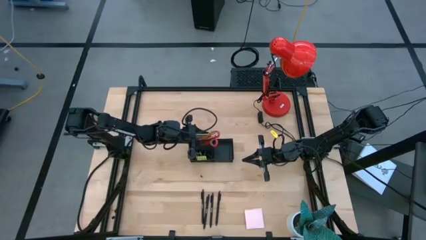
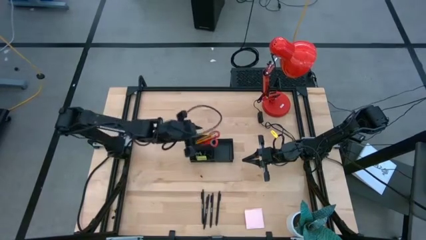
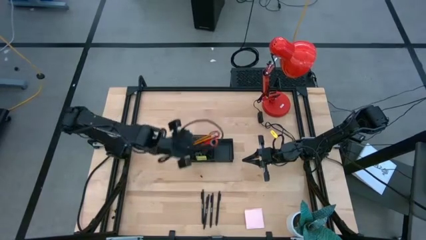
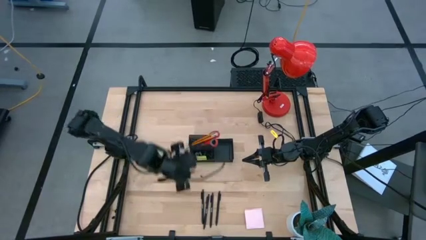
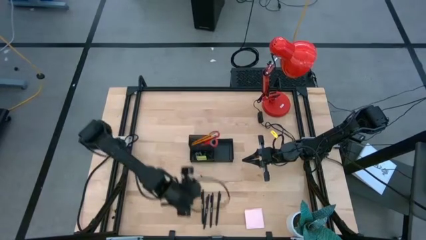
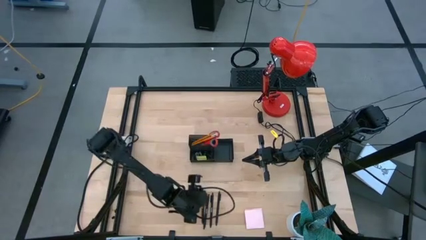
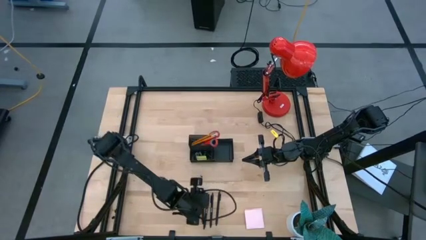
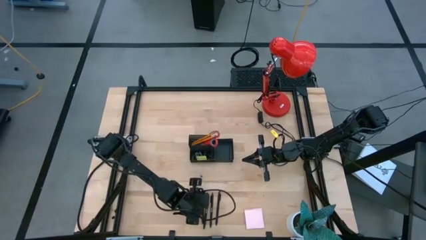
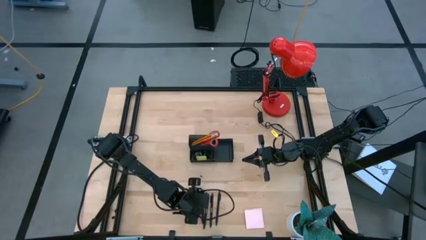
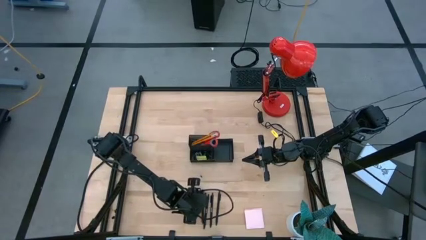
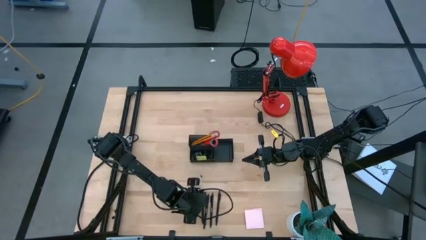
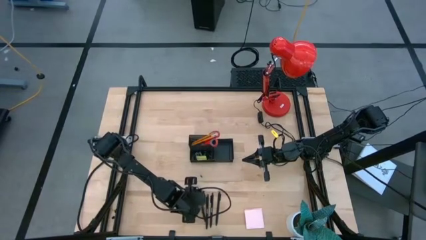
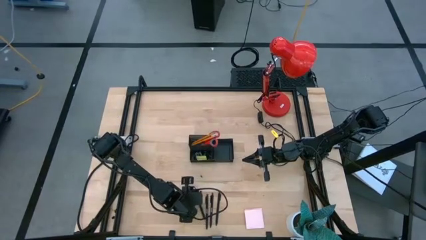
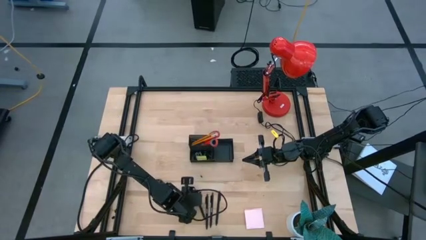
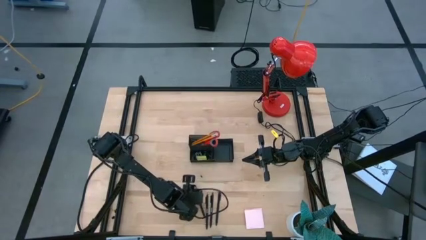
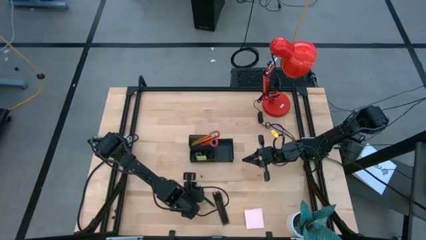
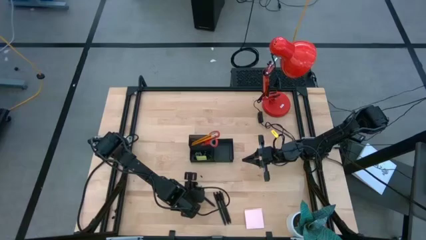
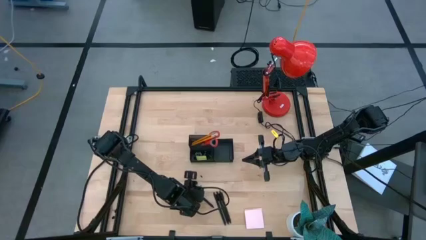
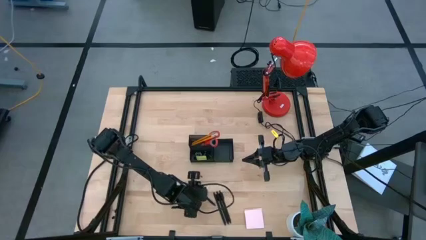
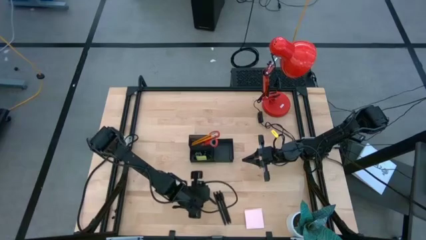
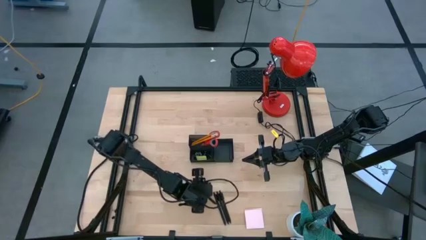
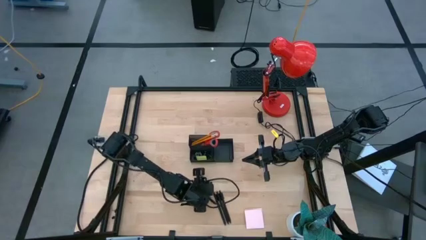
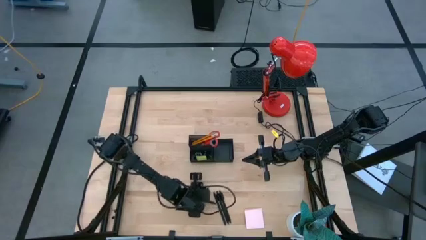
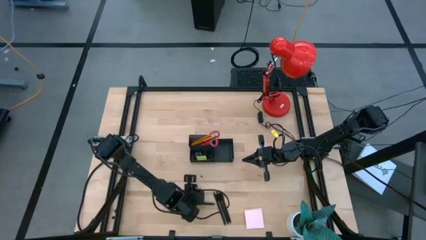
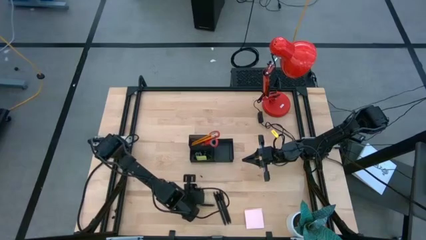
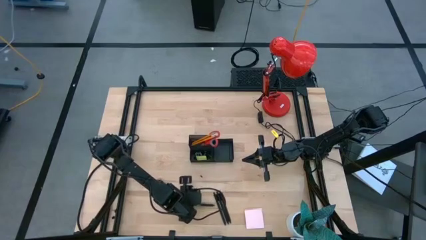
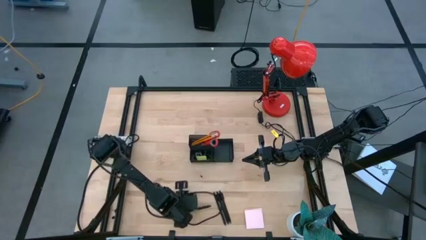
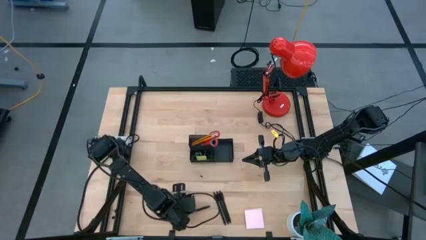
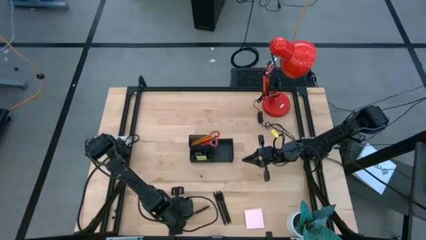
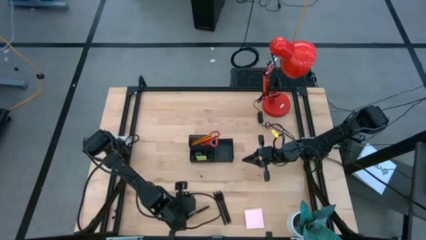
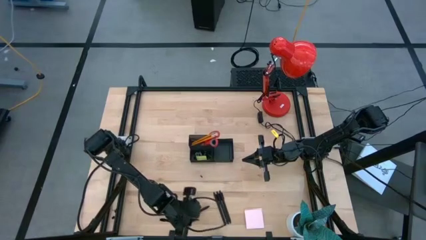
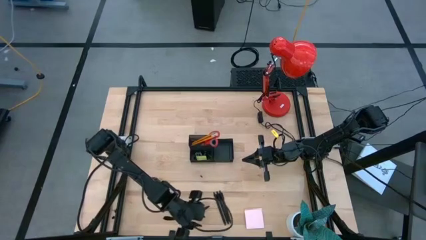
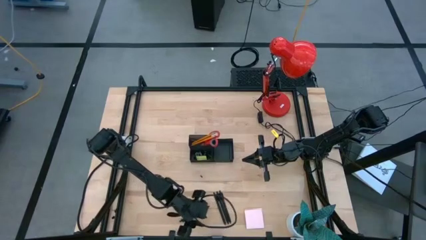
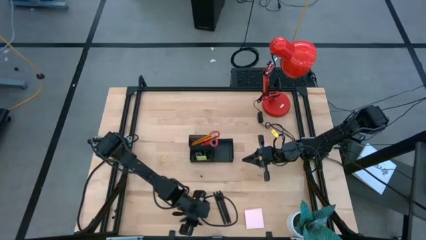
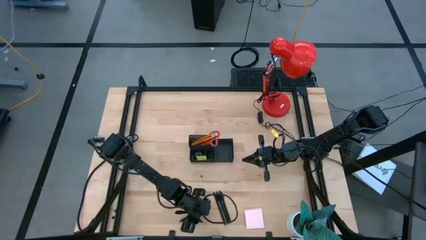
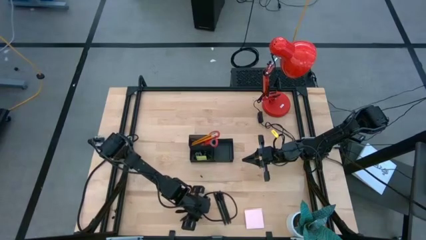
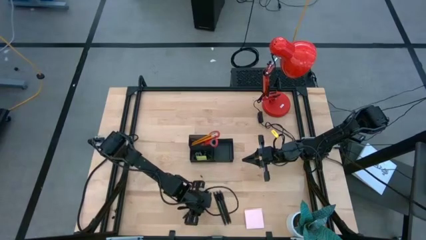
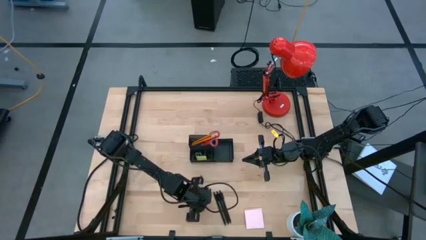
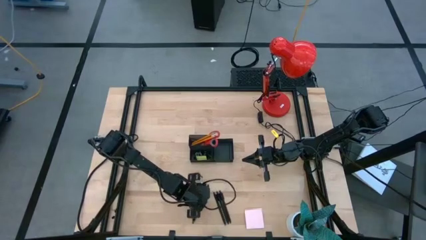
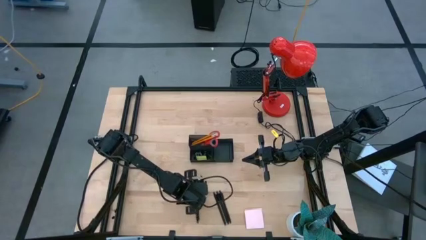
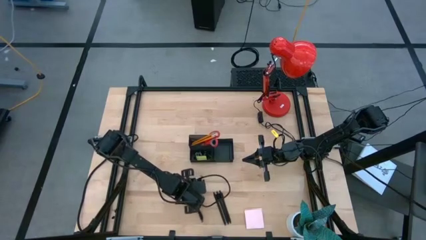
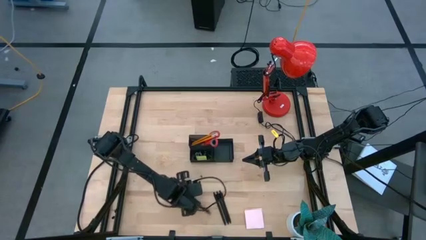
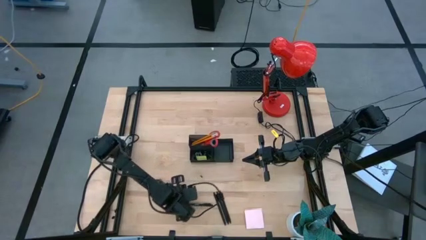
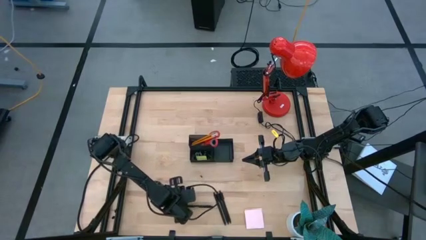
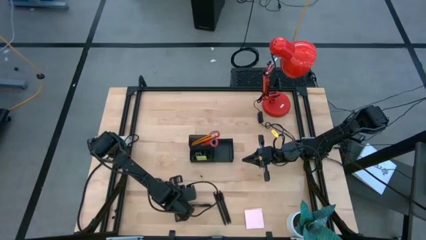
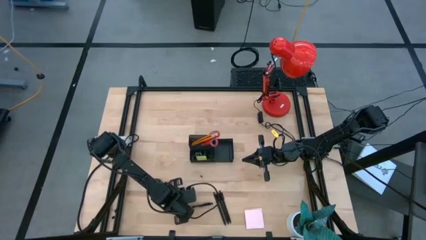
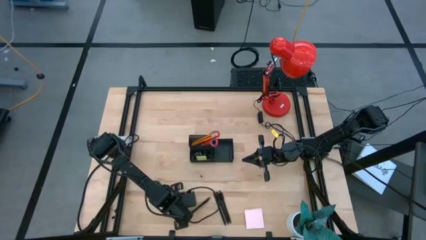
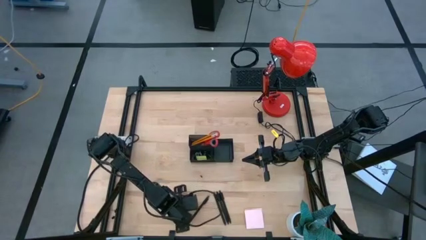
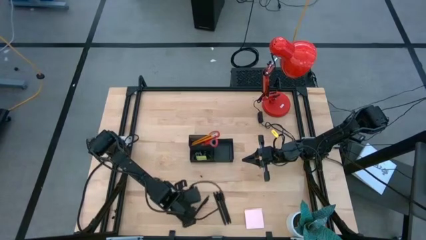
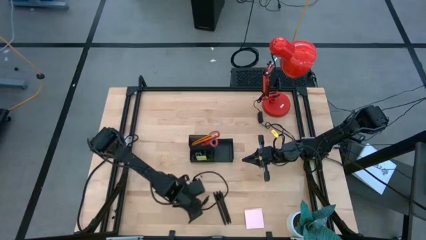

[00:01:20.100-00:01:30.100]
Task: Pick and place office supplies into organizer
Put the black pen into the black desk organizer

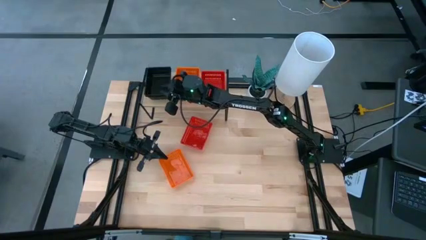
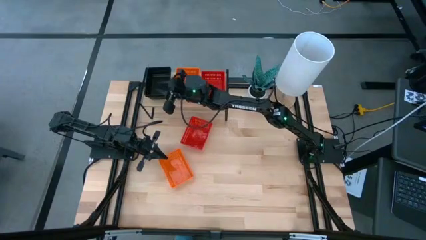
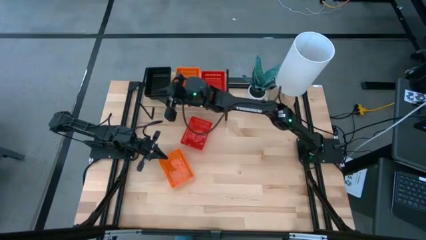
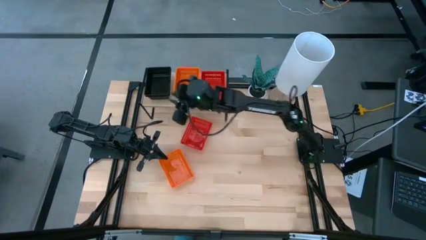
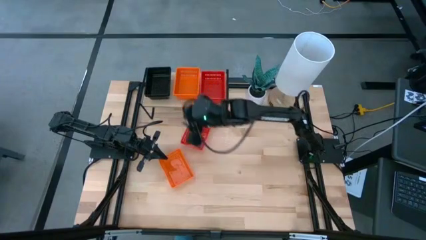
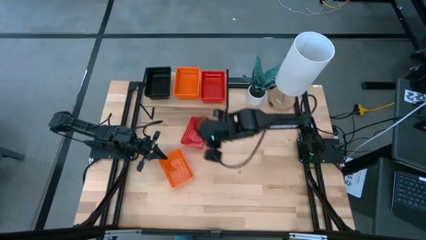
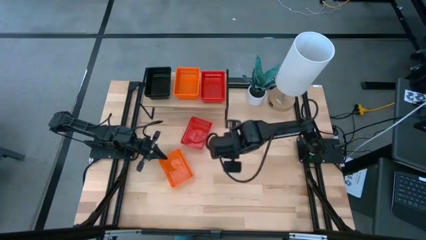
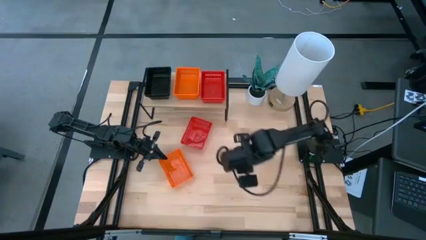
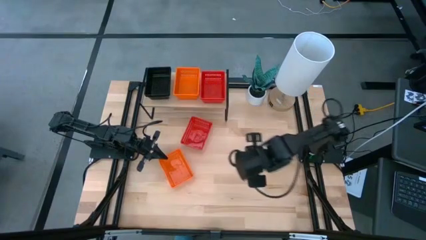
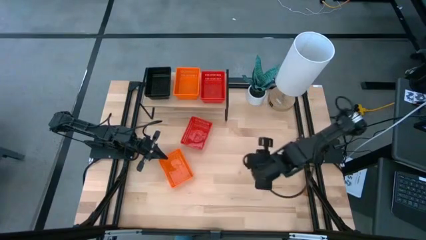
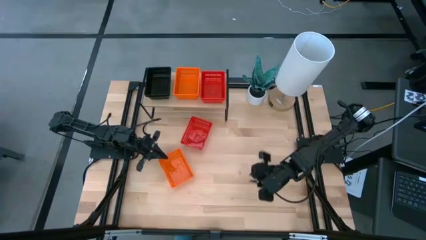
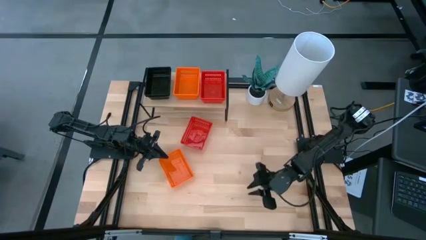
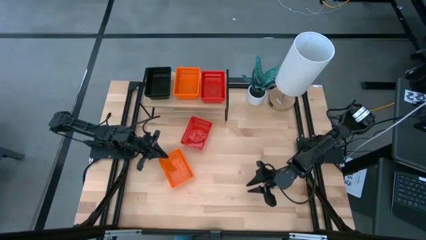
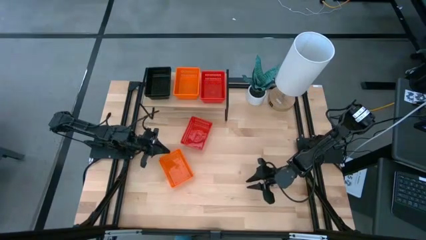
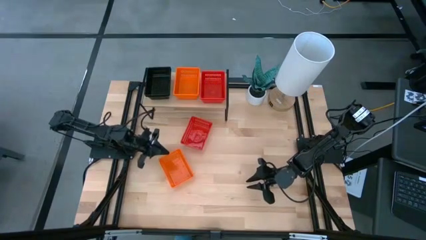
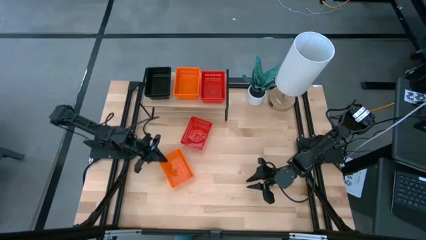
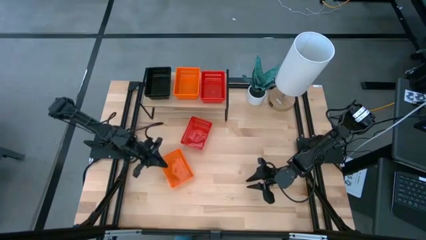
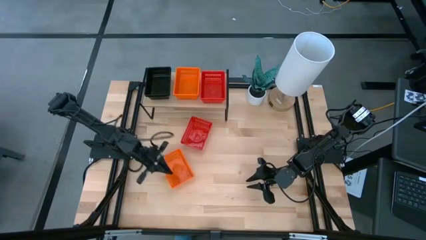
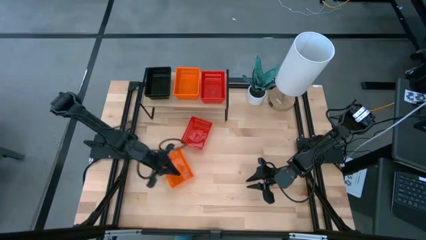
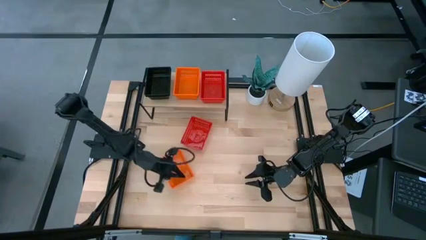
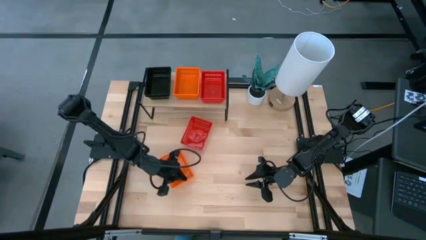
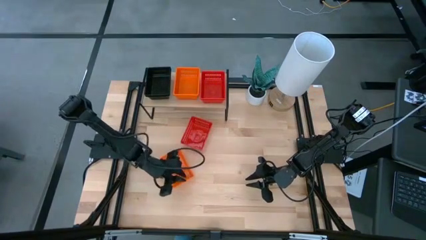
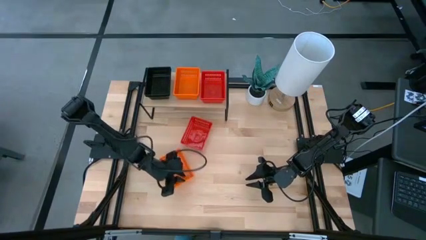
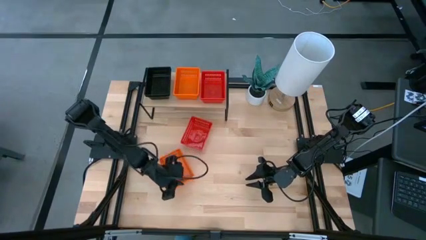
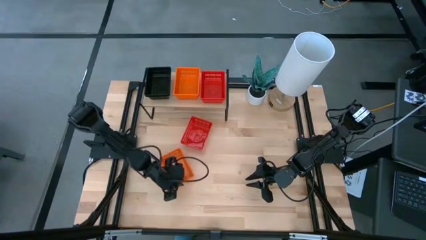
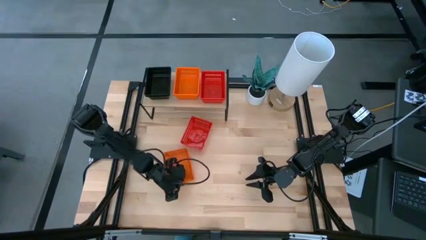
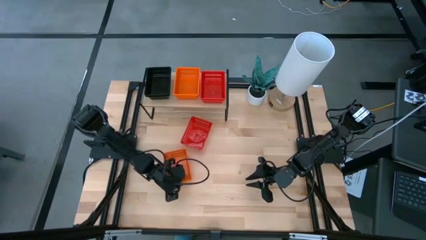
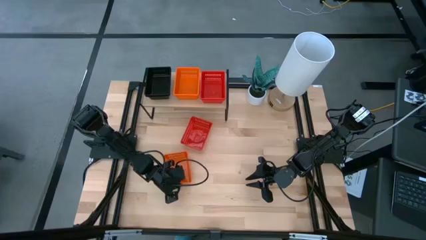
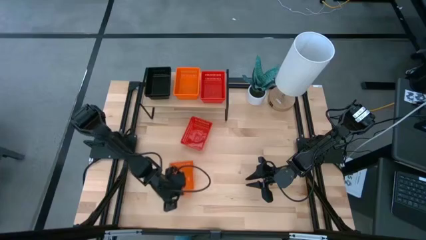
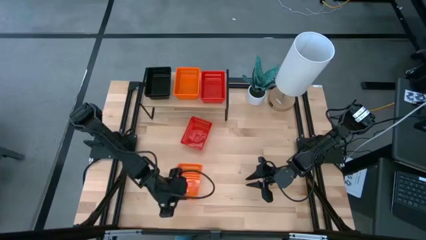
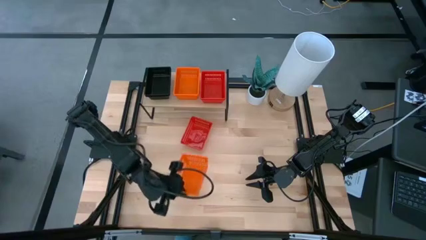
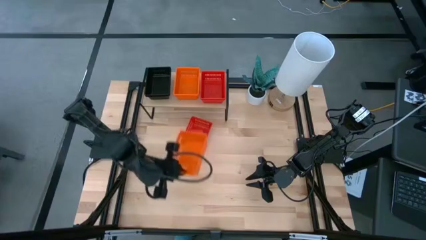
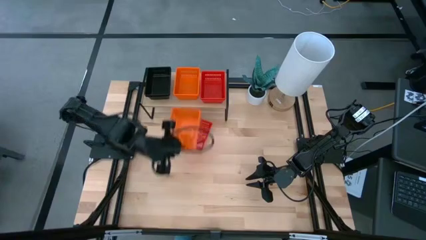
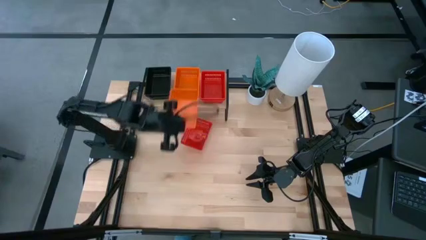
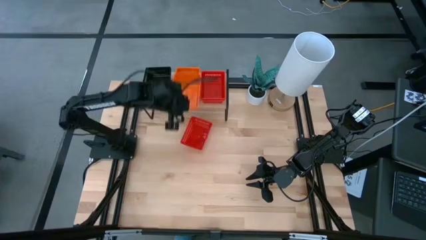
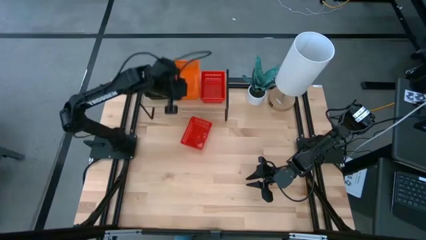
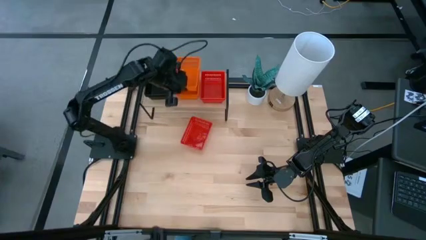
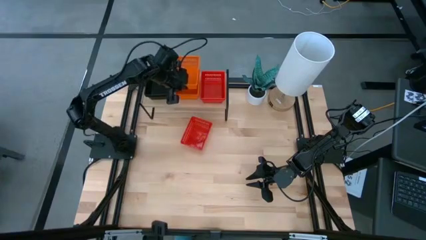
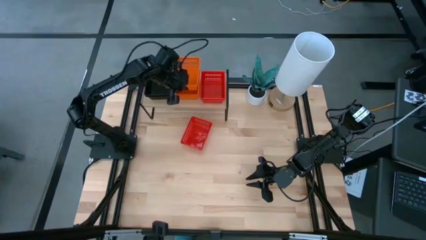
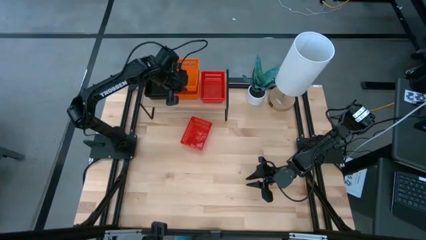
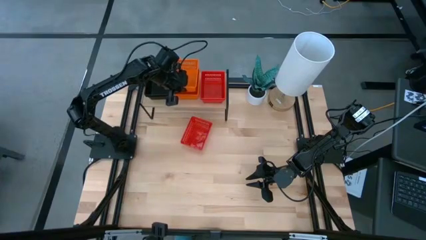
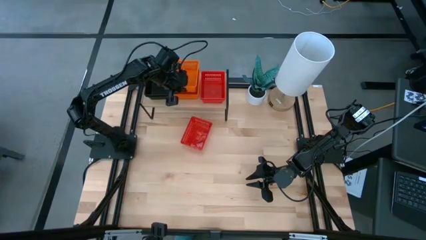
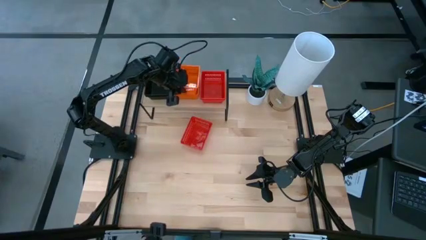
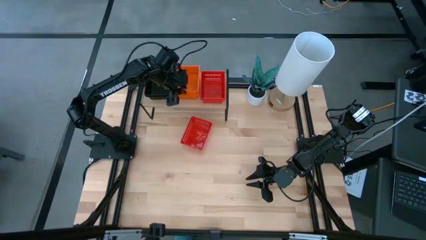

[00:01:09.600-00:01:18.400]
Task: Stack baskets on shelf by color
Stack the orange bin on top of the orange bin on the shelf
